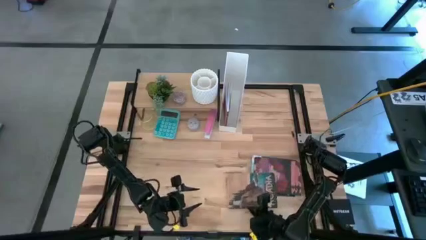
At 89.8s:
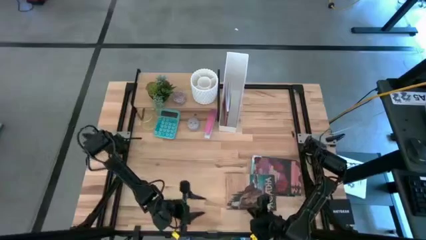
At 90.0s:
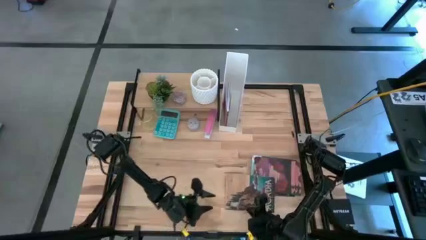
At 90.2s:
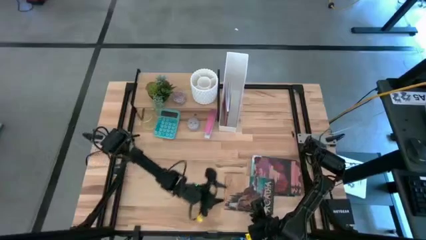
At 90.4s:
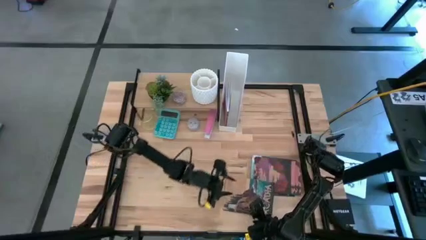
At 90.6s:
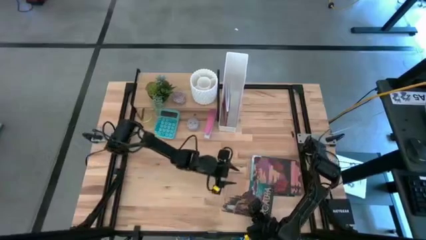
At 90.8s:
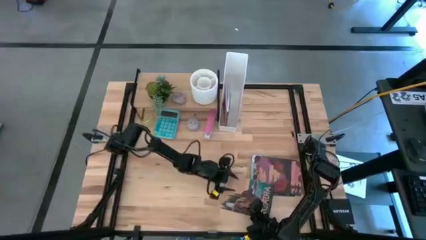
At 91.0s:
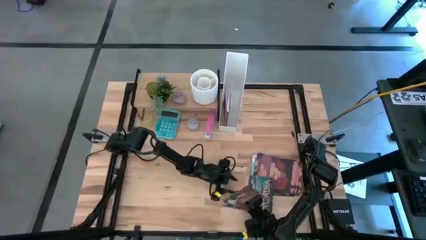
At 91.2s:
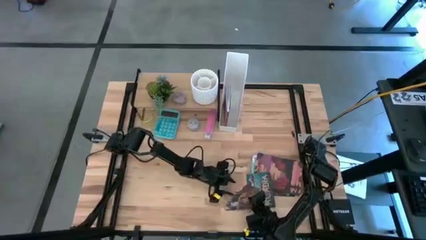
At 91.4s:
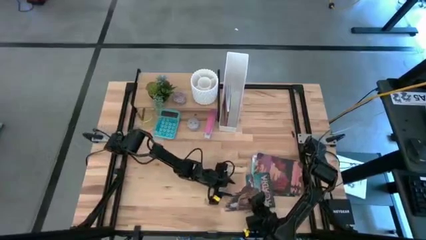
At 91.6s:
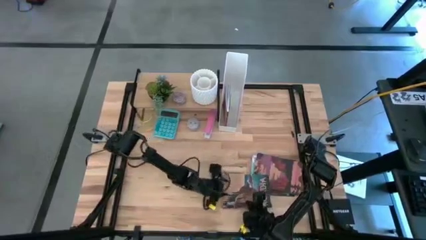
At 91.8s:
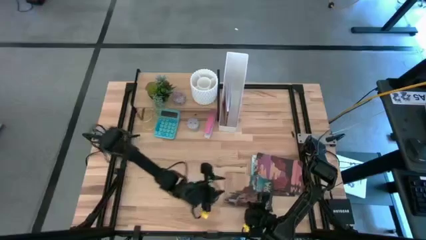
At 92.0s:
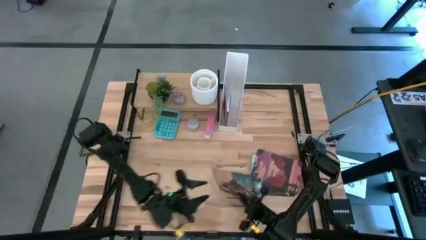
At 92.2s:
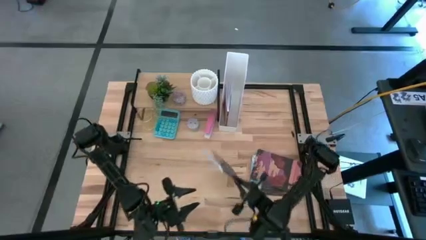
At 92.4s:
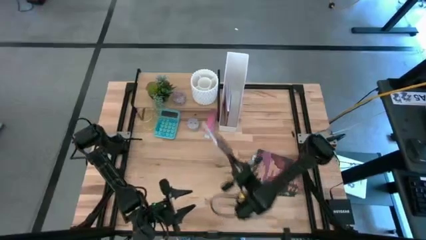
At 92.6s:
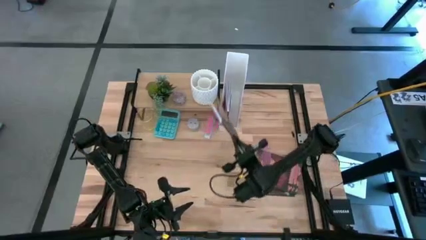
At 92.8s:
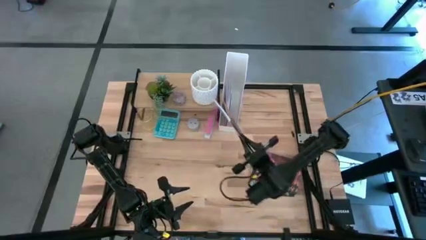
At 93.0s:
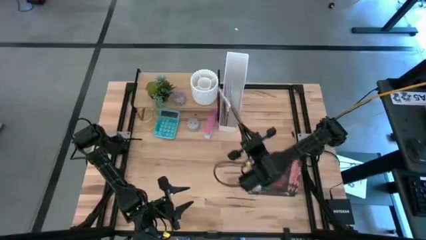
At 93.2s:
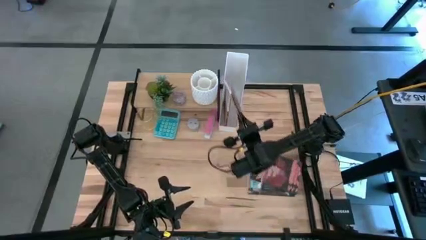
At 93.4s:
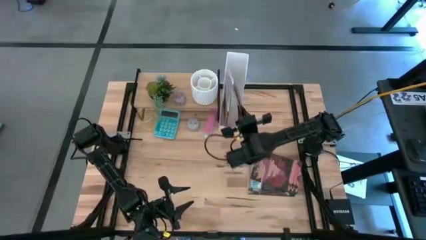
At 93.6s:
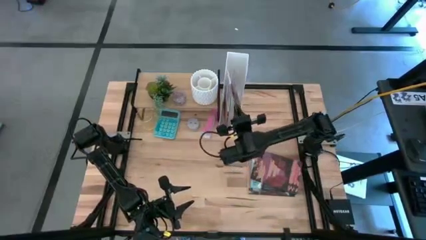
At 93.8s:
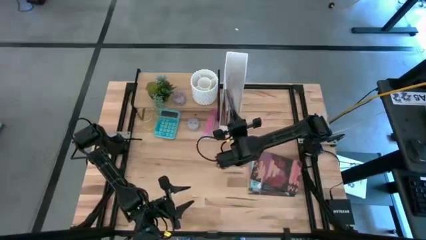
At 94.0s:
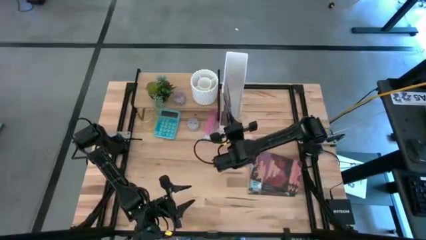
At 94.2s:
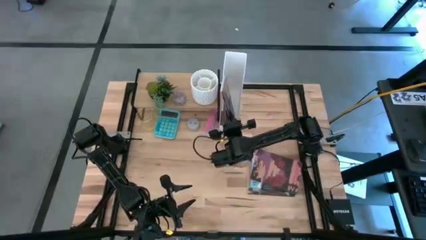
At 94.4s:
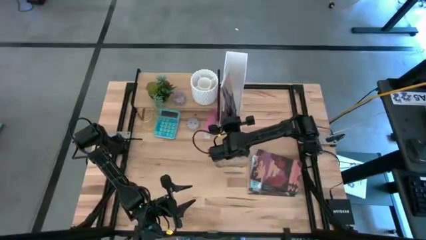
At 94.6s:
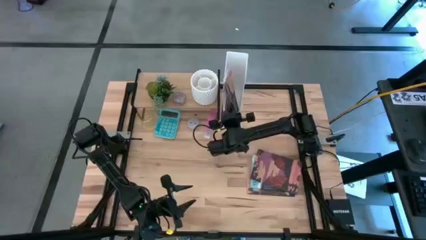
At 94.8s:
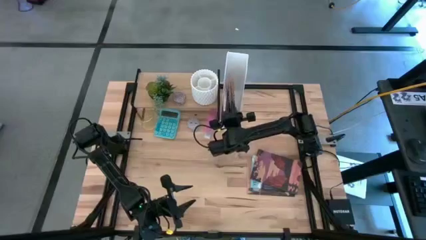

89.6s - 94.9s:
Task: Stock shelves
Put the brown book in the book organizer

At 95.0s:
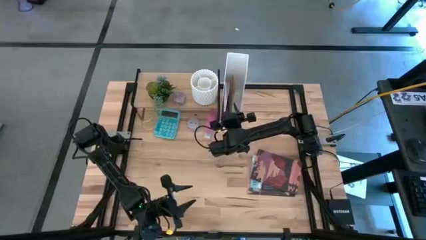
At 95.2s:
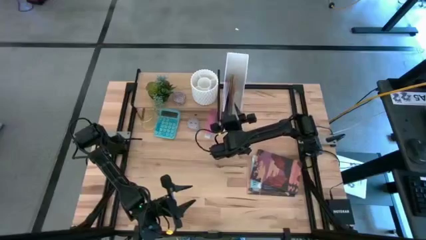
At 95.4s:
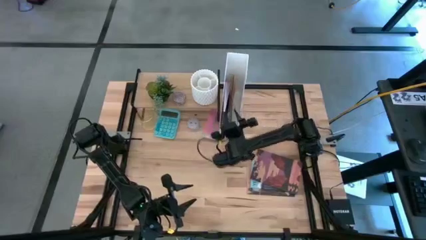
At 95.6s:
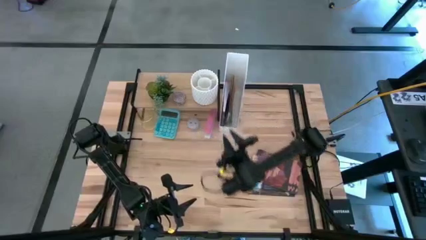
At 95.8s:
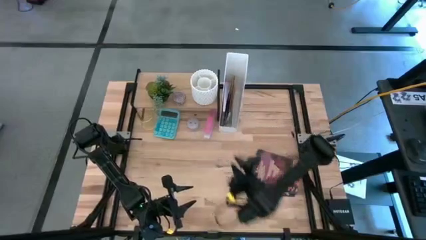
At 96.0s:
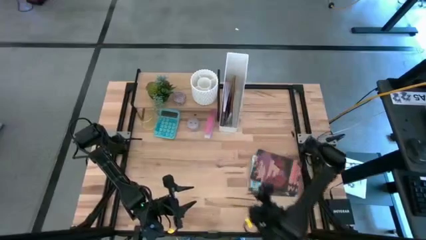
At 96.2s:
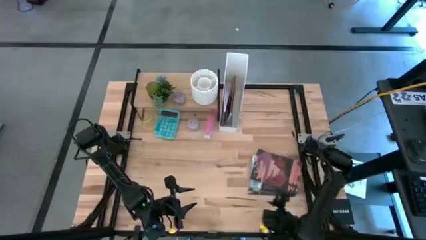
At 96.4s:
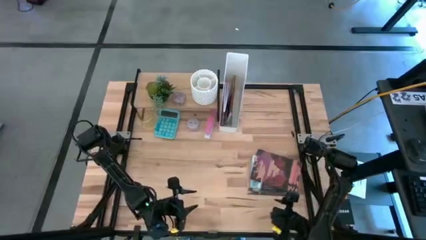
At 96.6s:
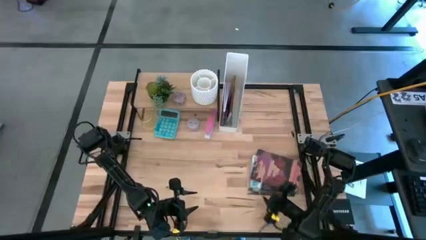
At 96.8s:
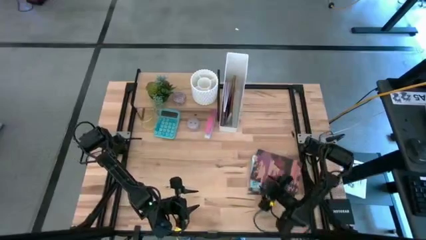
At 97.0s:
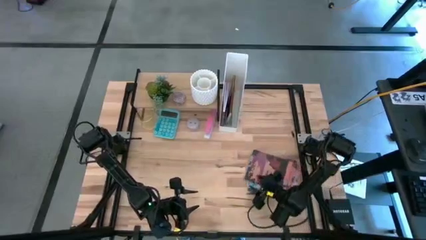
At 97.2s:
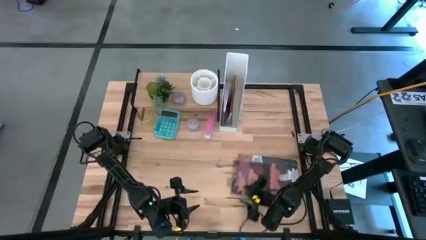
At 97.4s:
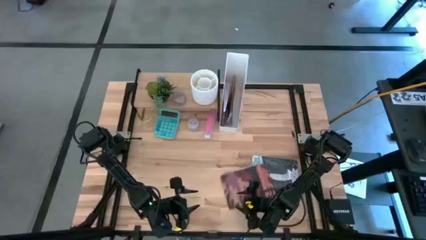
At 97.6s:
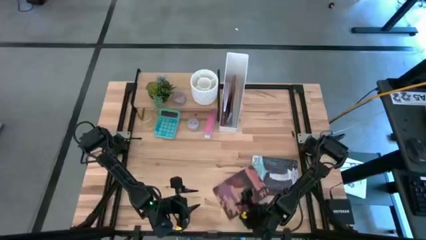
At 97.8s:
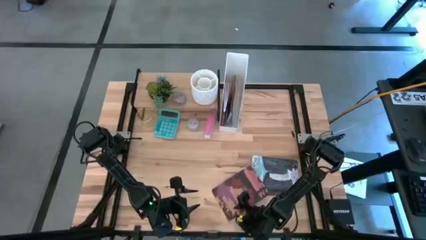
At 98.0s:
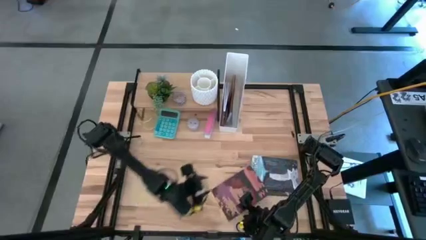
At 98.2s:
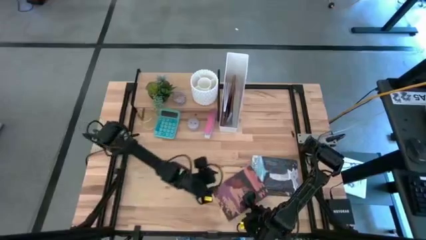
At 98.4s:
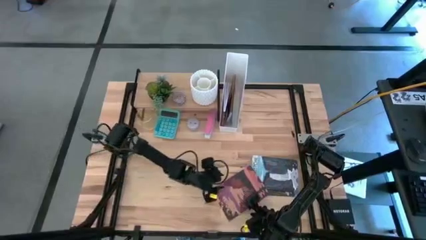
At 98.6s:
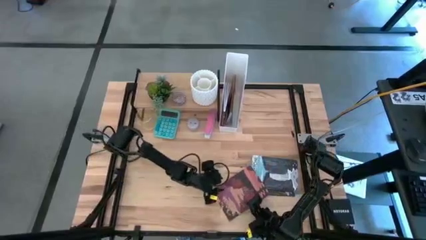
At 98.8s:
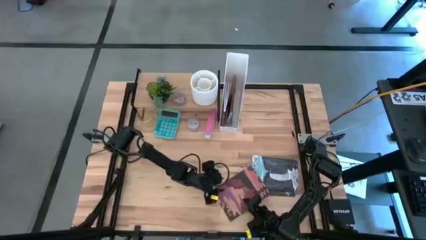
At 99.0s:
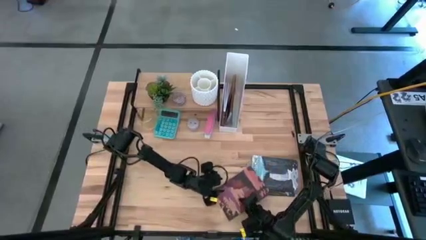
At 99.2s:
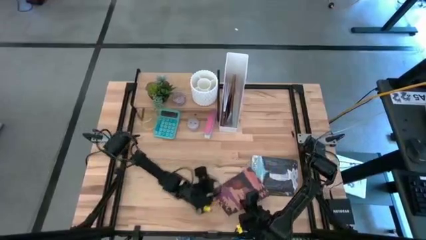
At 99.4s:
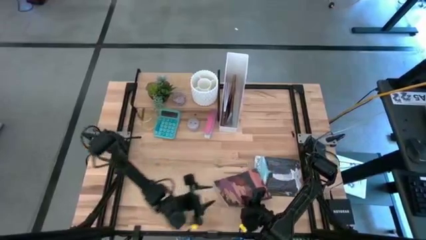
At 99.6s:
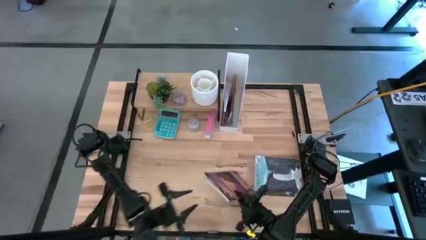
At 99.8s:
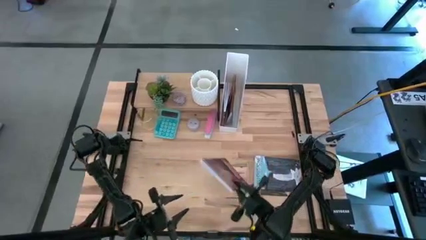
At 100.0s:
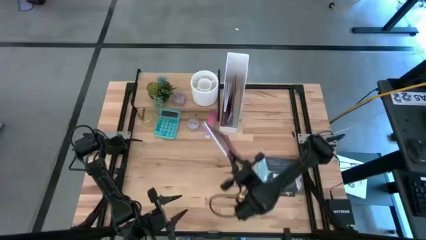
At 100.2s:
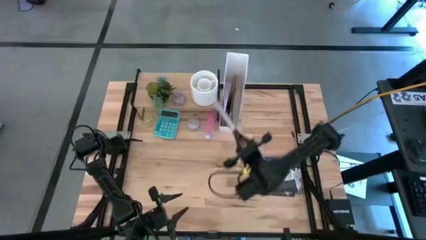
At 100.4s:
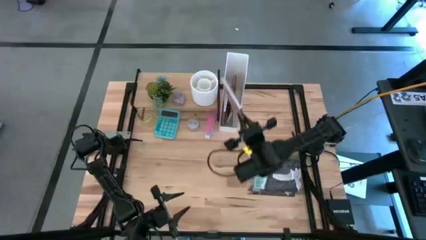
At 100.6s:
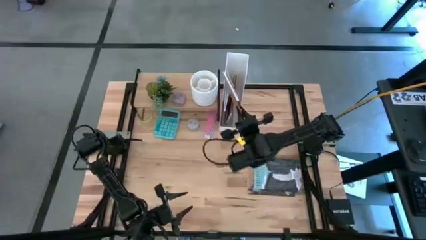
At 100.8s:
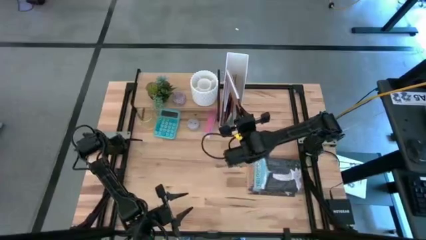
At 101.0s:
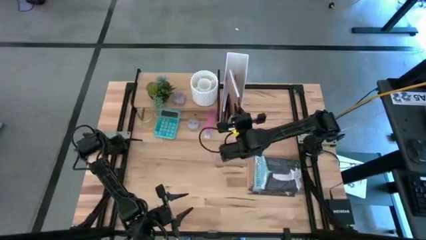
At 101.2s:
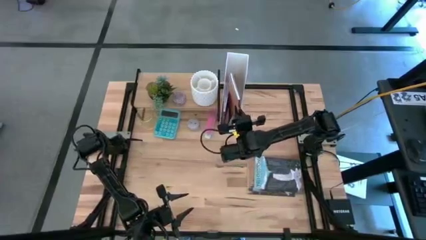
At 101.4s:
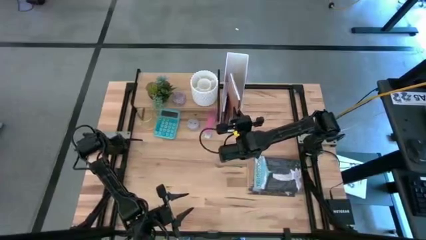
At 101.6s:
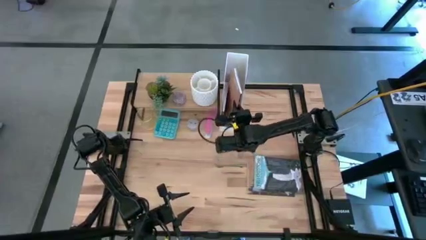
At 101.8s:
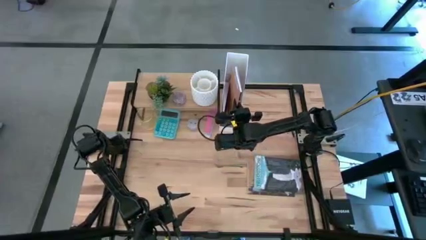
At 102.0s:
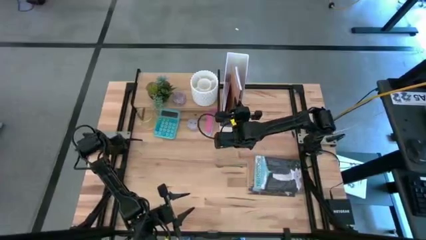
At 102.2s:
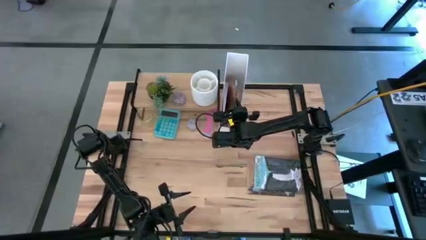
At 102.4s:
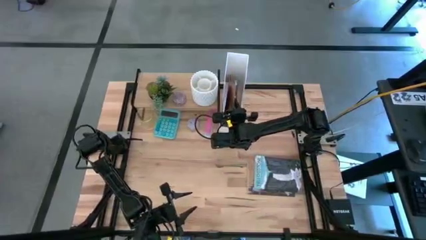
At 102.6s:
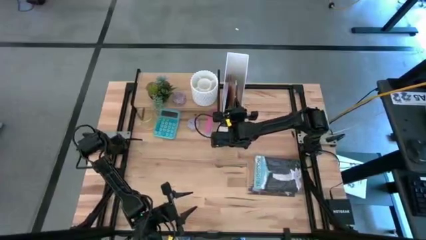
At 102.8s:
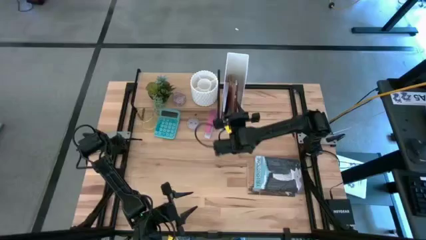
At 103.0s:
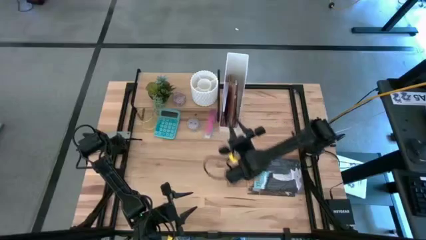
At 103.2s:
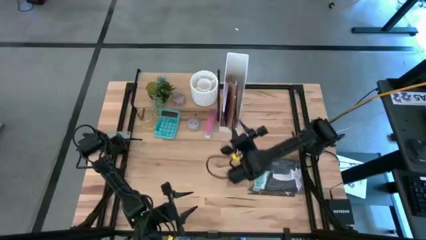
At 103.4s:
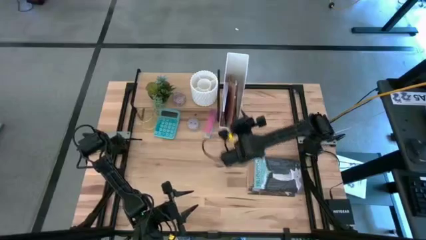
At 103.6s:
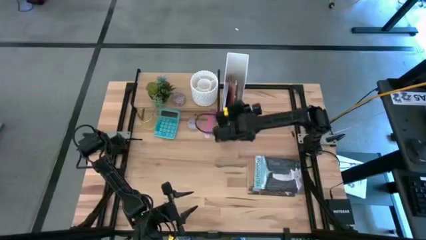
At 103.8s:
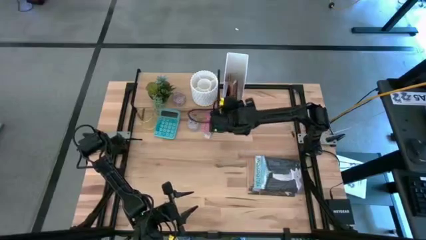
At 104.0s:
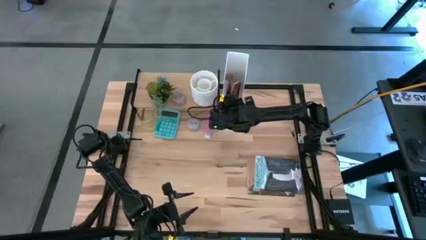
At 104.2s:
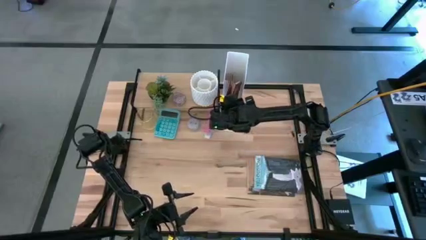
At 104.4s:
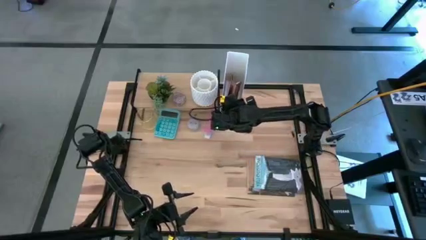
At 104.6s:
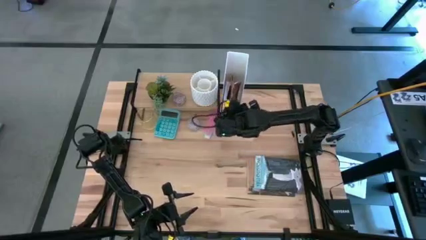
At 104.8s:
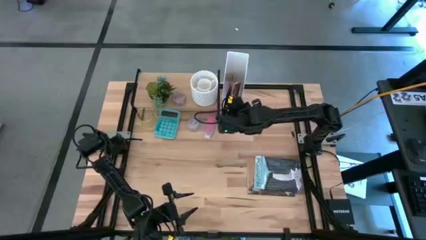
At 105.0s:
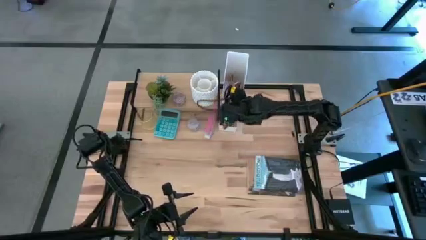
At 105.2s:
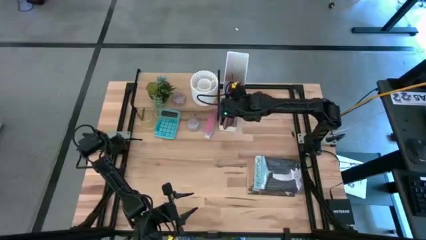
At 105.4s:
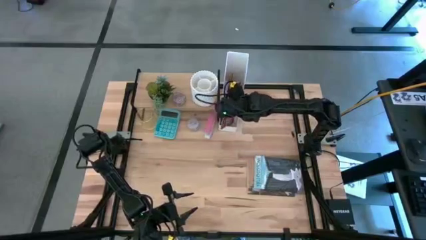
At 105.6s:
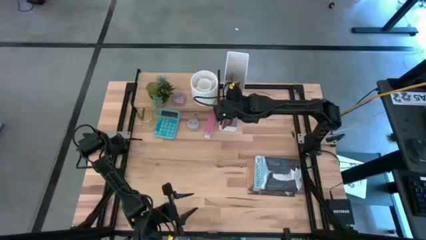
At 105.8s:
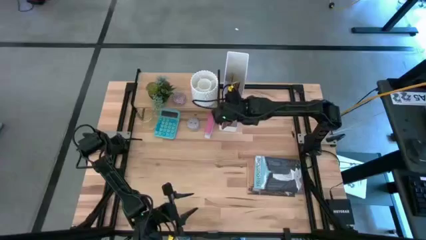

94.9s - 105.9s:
Put the red book in the book organizer
